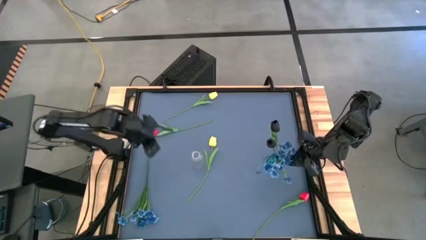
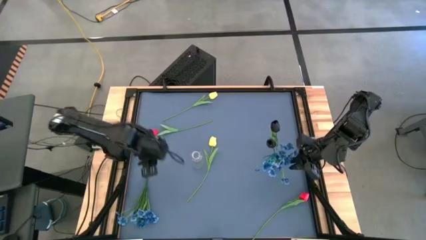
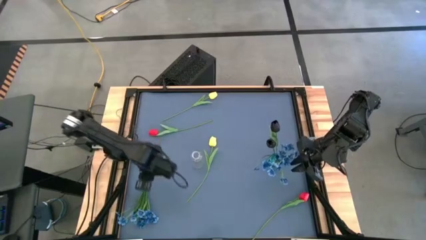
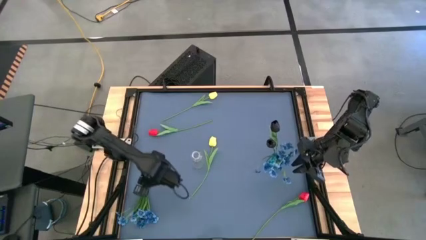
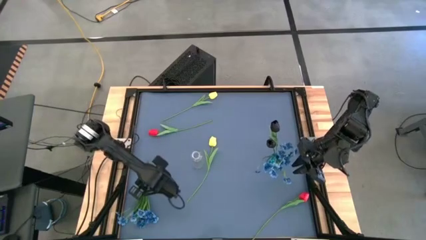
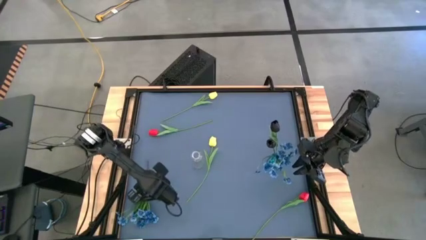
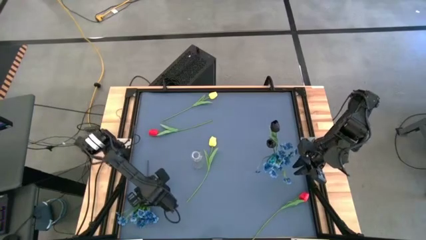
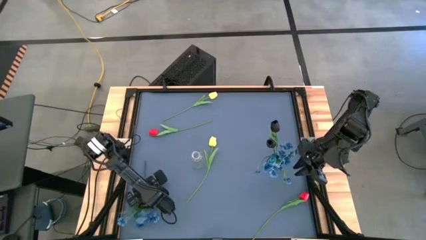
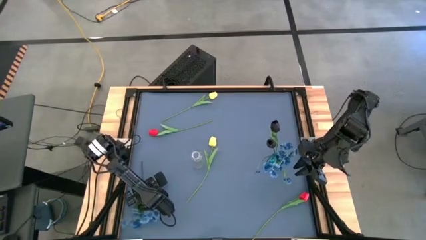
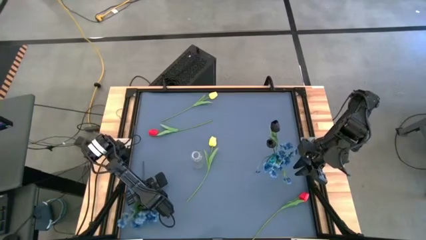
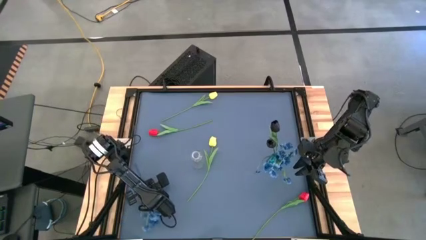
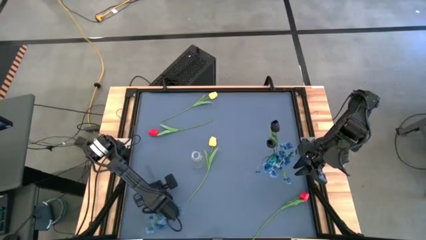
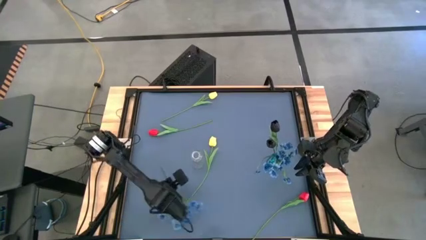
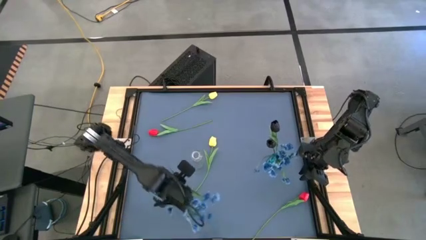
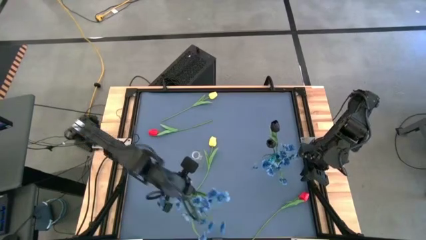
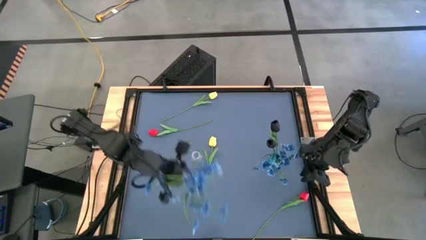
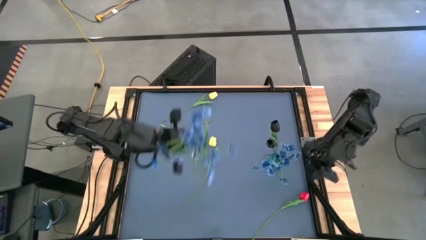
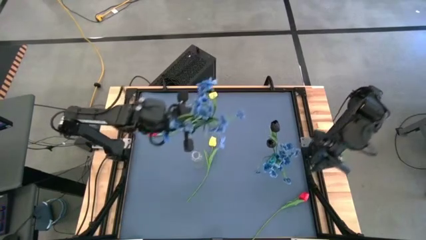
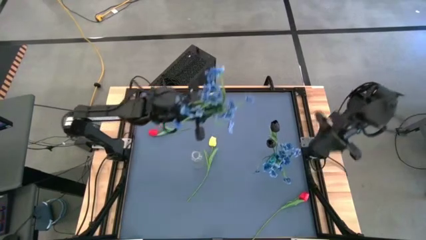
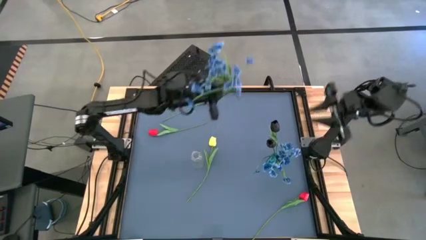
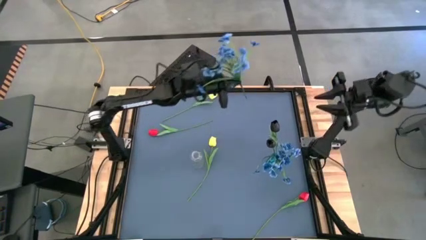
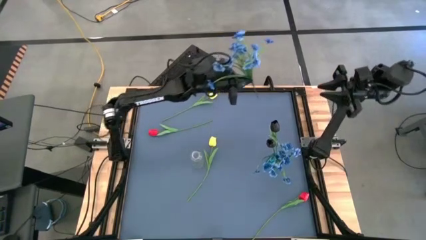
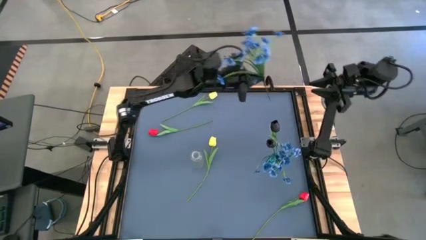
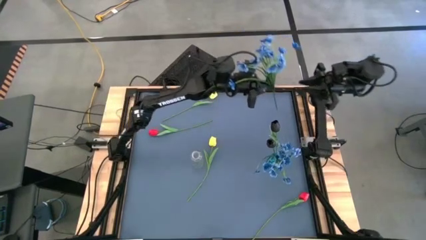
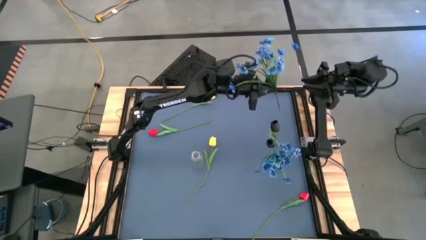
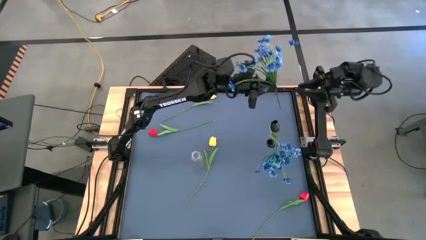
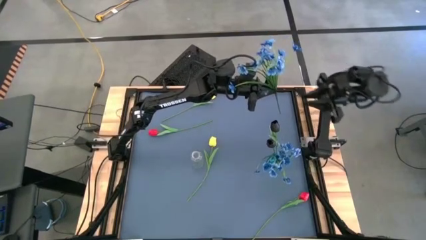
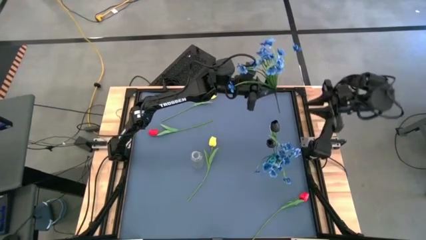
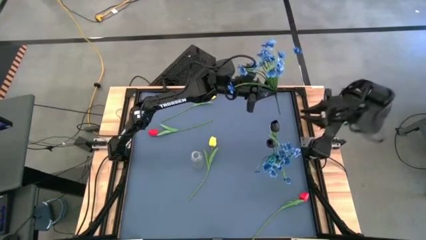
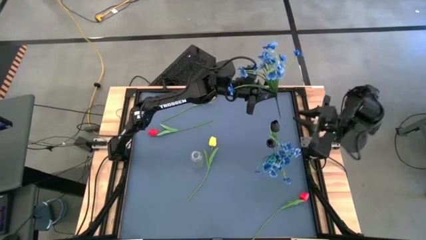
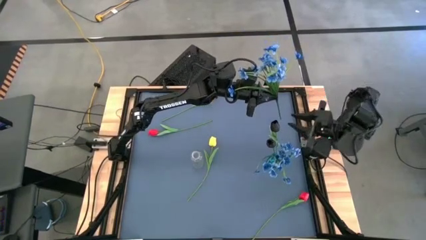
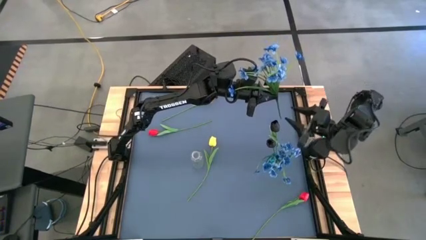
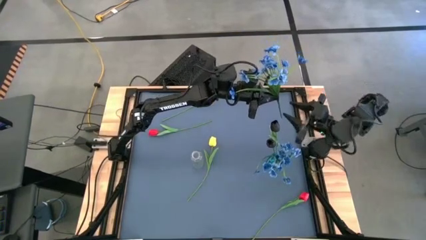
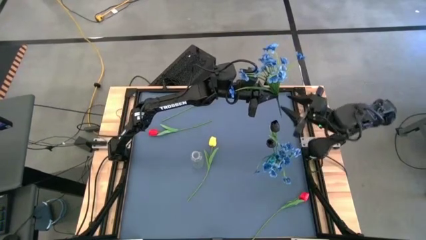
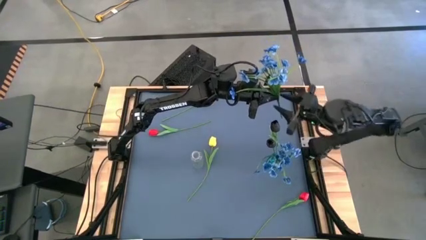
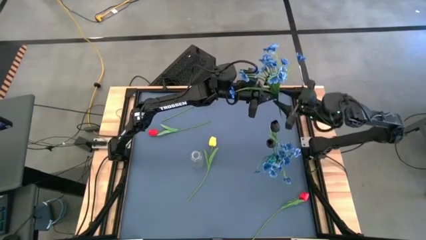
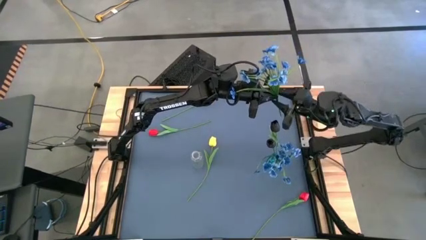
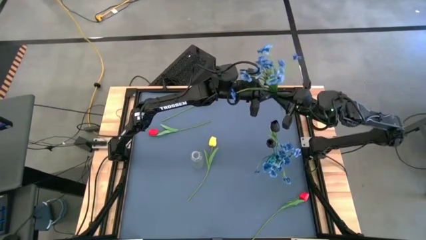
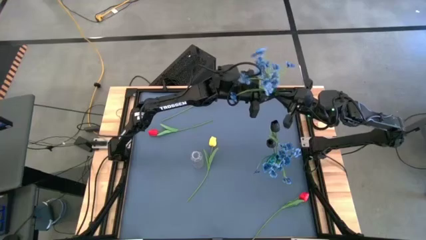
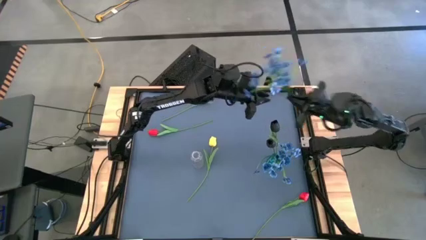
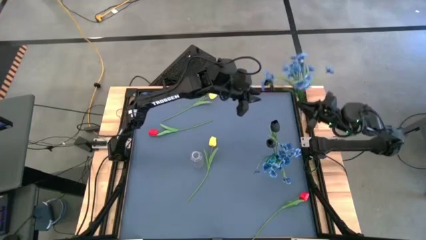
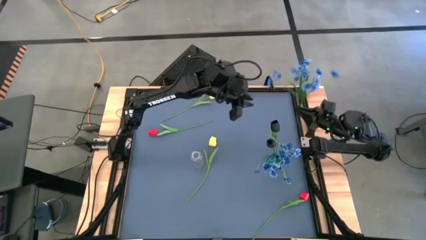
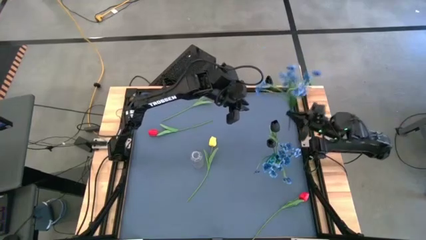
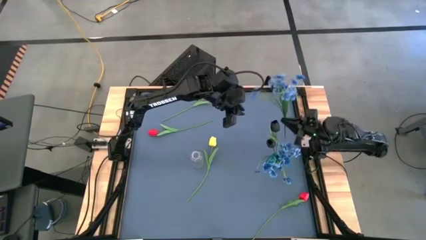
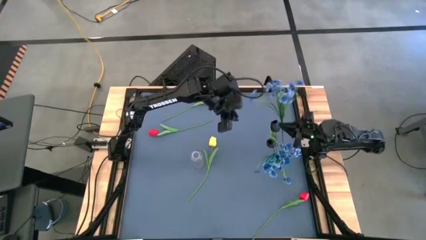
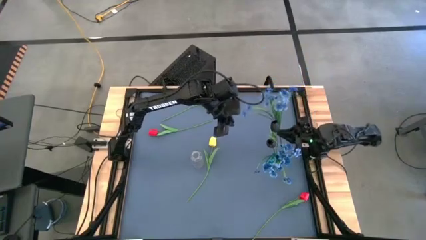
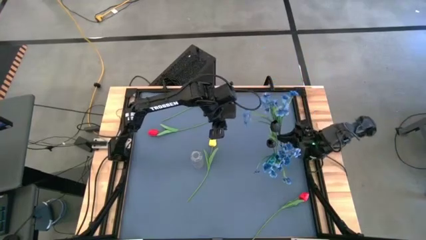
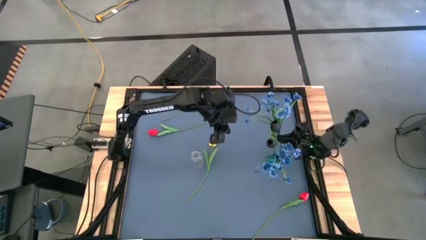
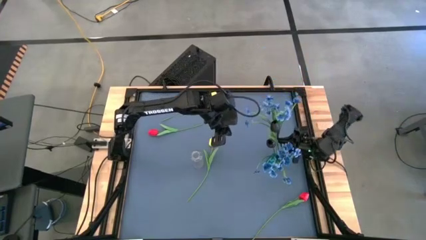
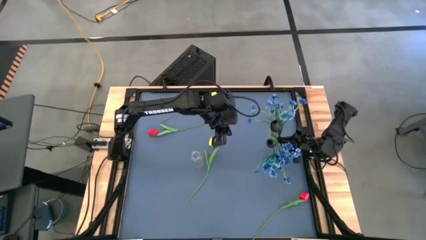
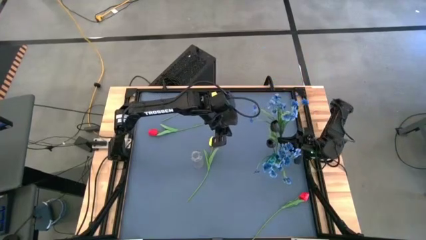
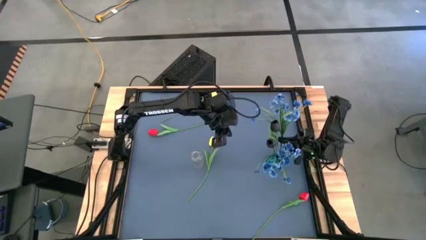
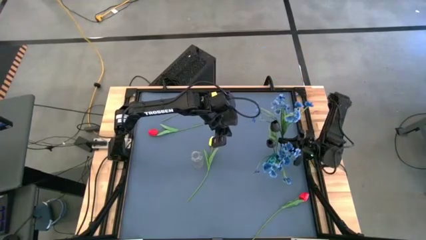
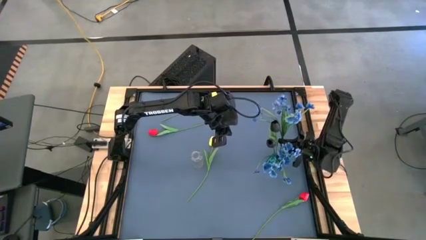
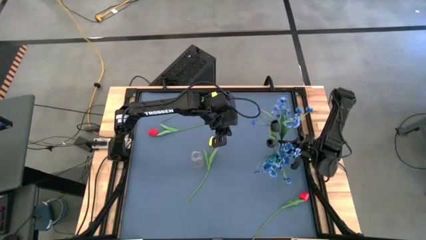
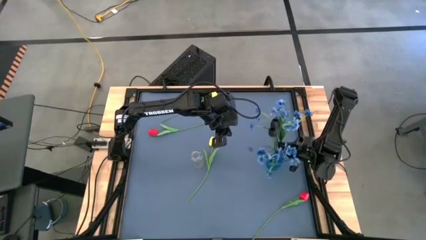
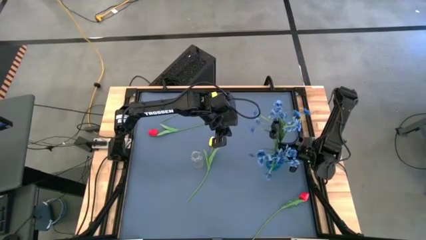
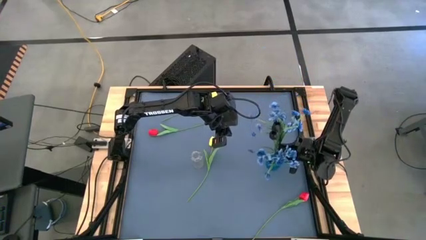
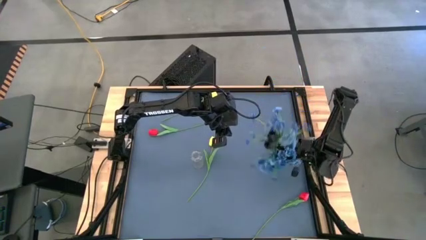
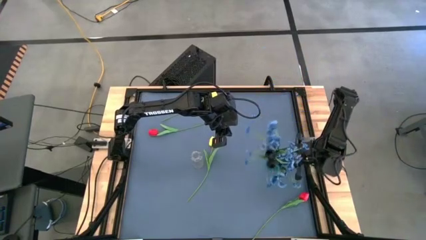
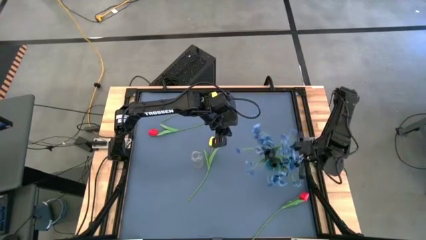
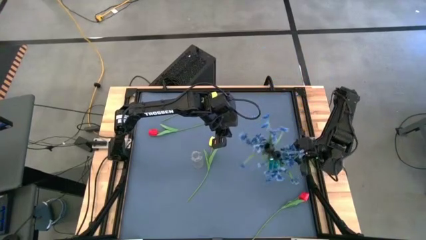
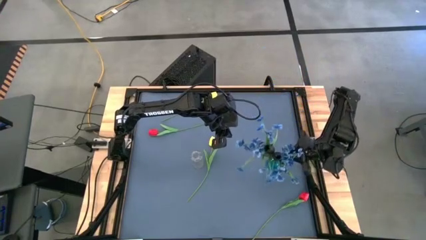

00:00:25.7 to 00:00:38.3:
Task: Sort flowers into vase by color
Put the blue flowers into the blue vase

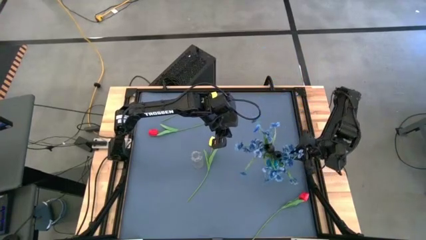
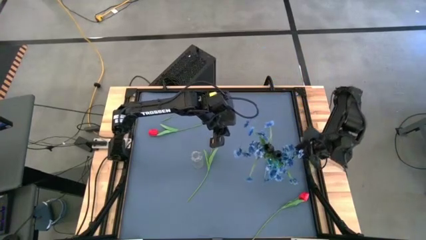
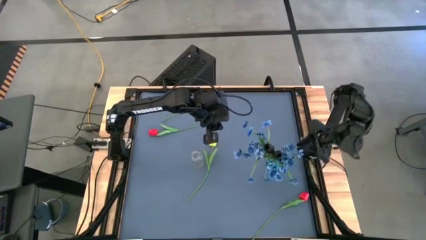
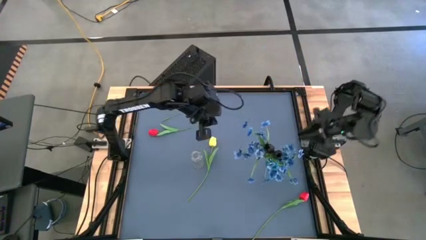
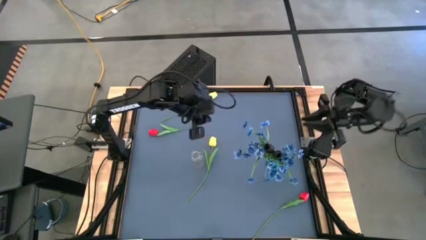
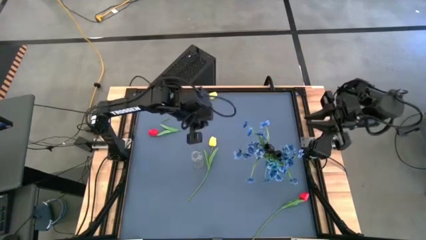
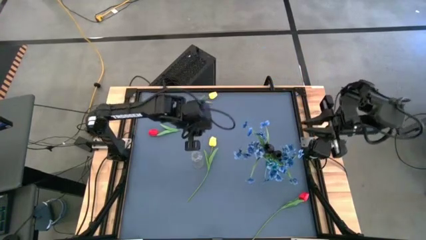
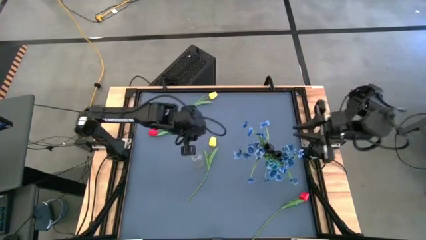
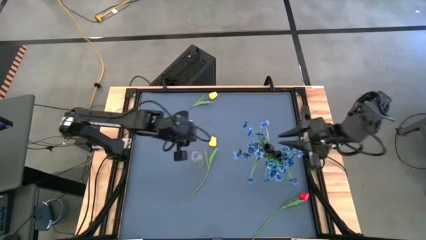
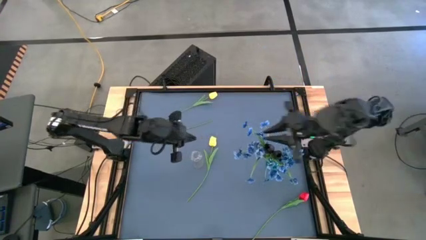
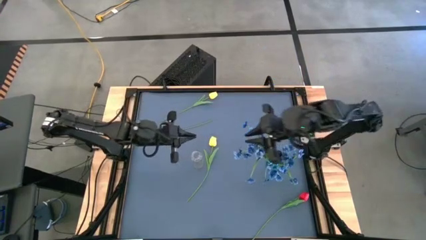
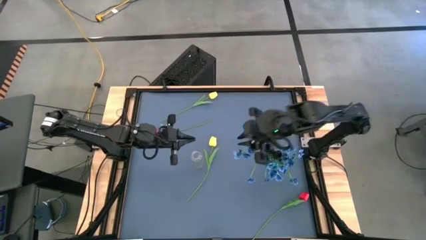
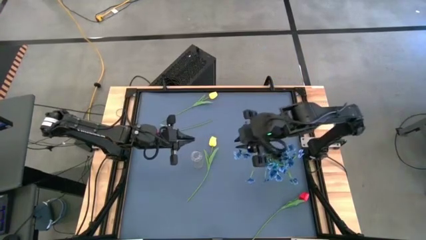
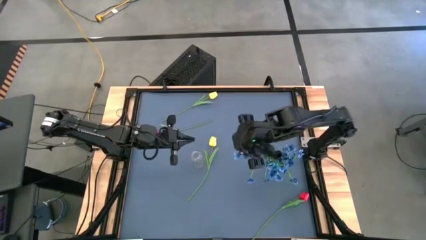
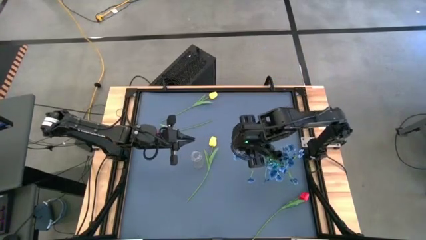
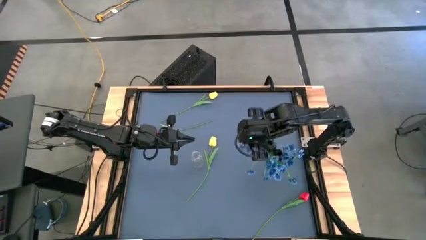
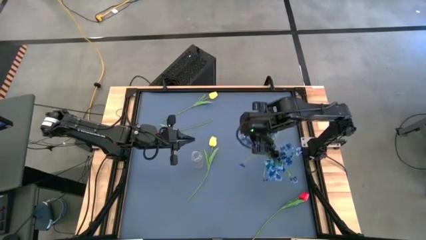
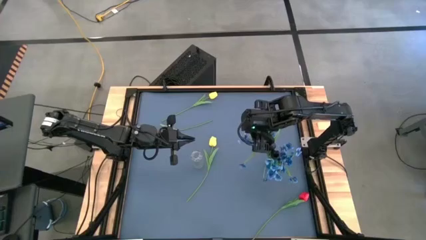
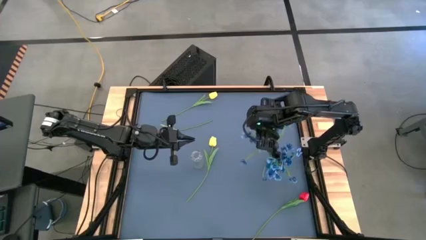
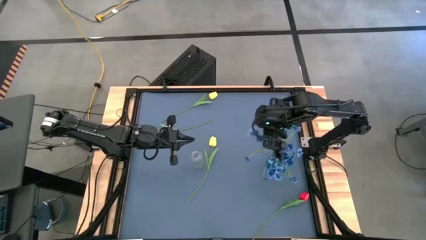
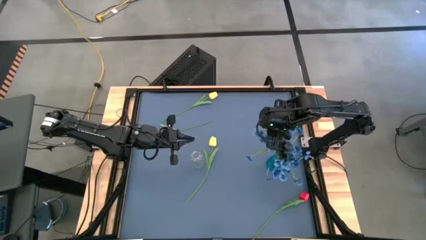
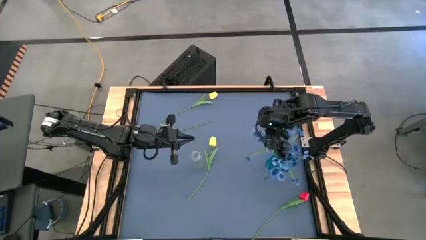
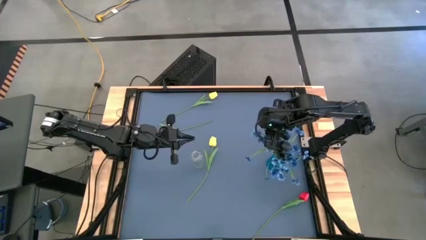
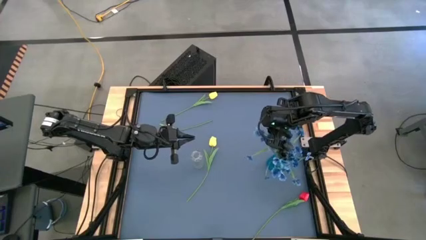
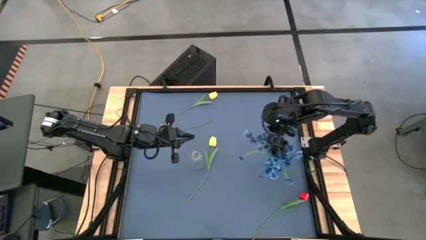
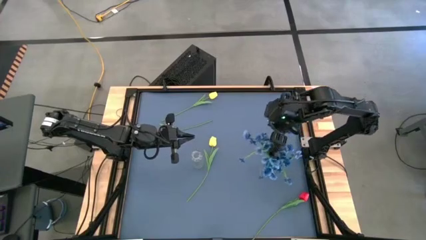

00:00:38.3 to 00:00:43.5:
Adjust the blue flower
